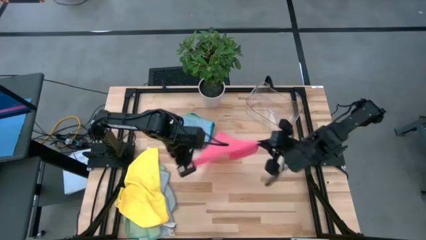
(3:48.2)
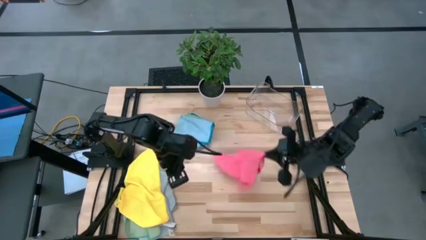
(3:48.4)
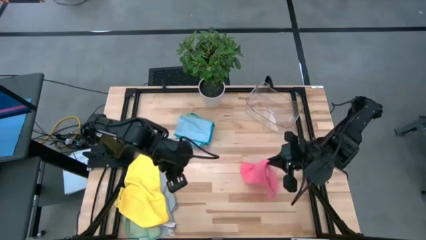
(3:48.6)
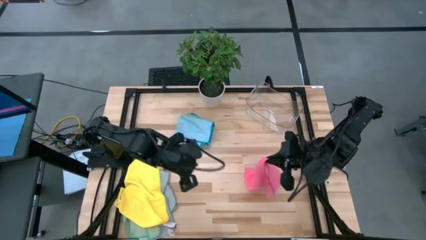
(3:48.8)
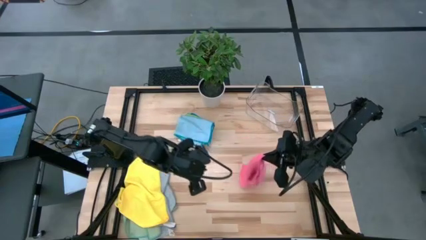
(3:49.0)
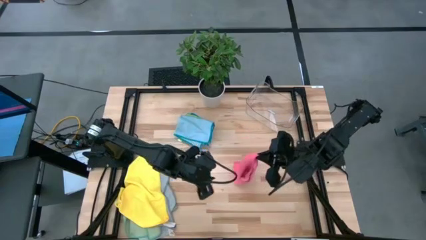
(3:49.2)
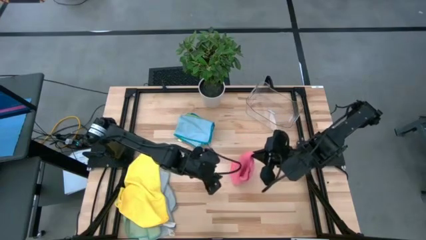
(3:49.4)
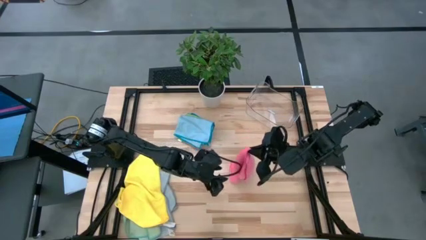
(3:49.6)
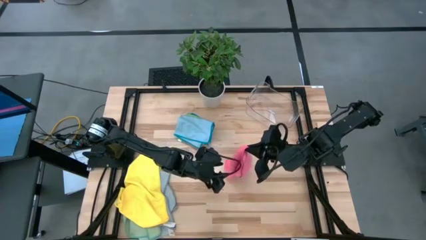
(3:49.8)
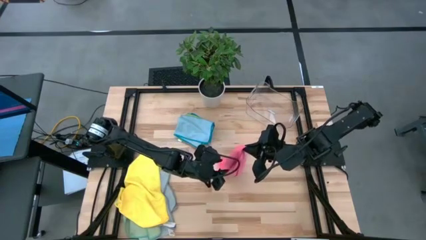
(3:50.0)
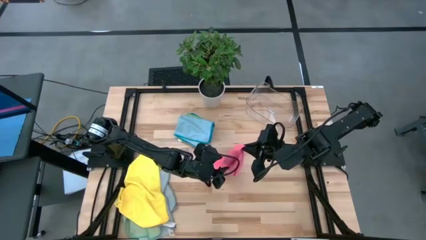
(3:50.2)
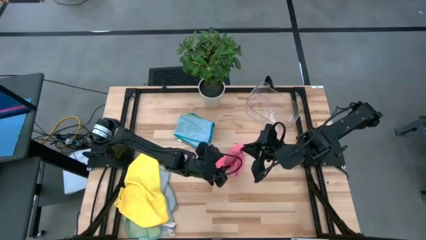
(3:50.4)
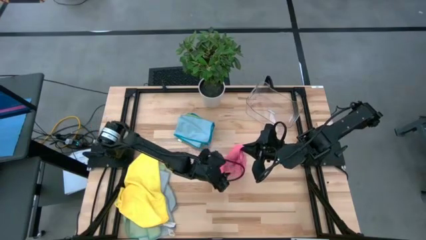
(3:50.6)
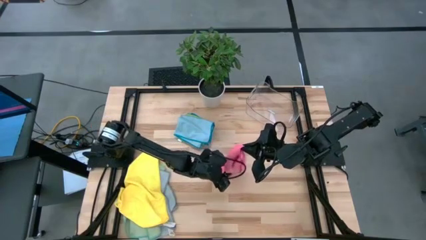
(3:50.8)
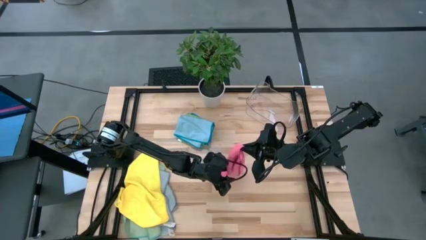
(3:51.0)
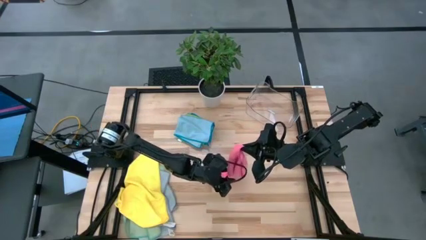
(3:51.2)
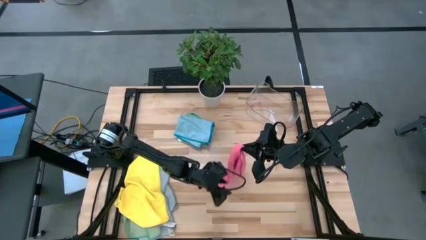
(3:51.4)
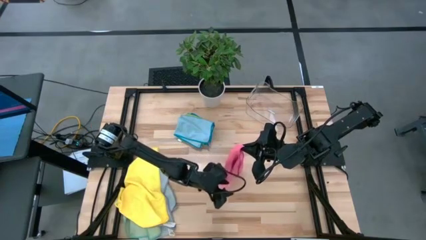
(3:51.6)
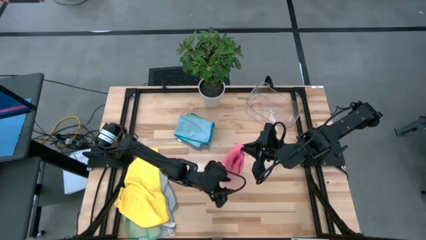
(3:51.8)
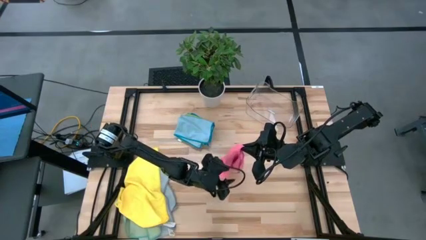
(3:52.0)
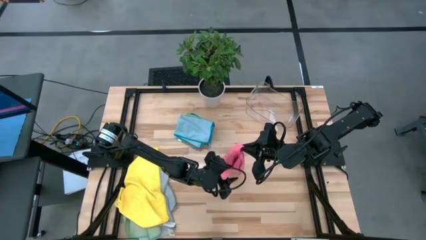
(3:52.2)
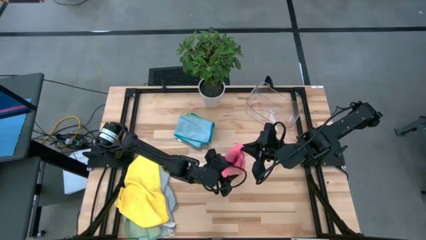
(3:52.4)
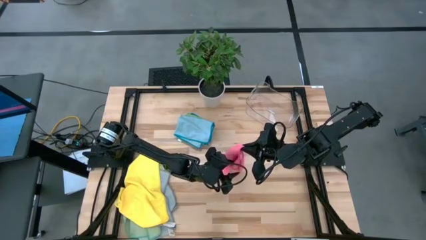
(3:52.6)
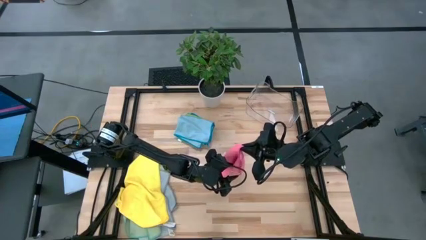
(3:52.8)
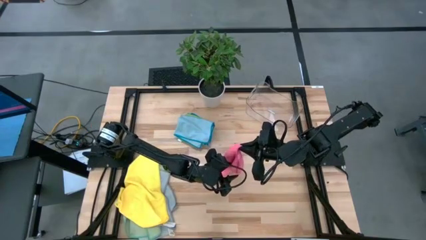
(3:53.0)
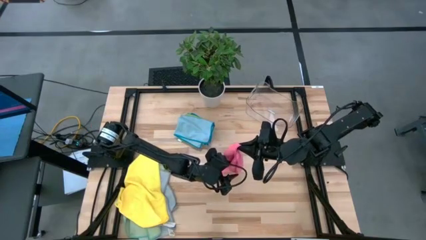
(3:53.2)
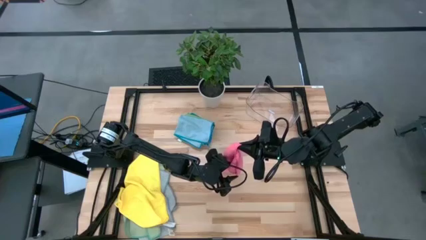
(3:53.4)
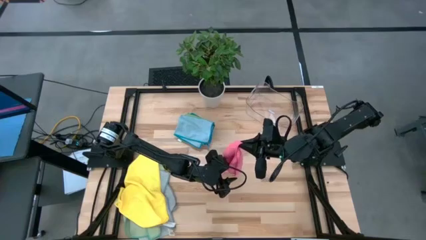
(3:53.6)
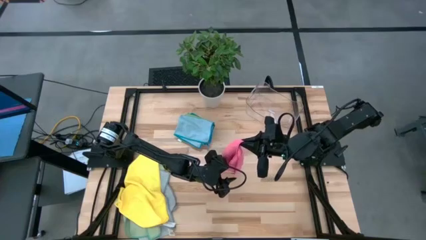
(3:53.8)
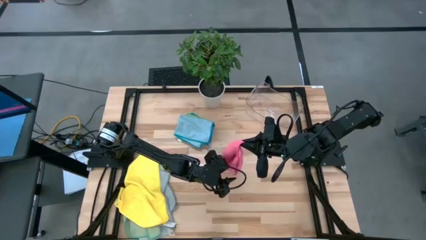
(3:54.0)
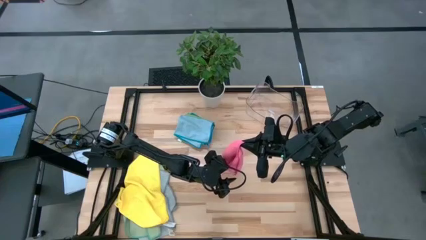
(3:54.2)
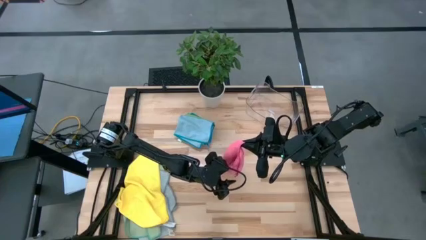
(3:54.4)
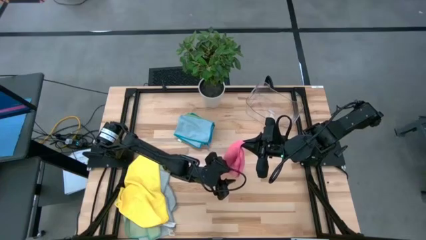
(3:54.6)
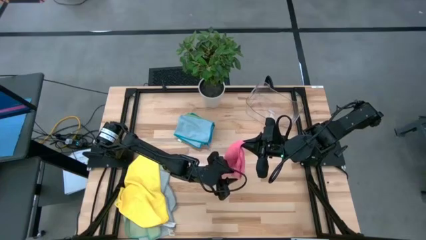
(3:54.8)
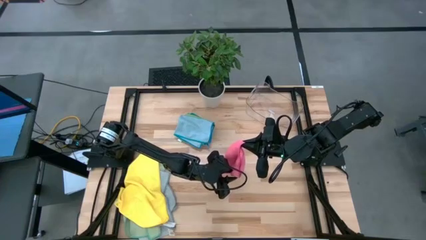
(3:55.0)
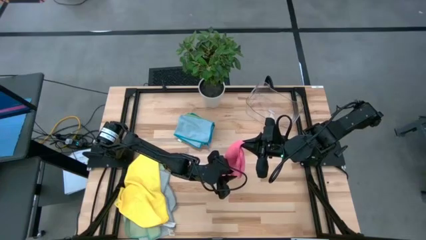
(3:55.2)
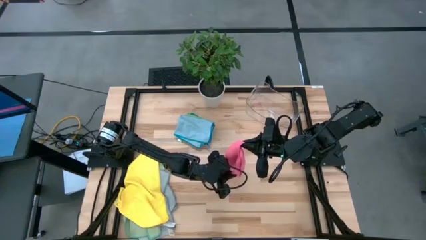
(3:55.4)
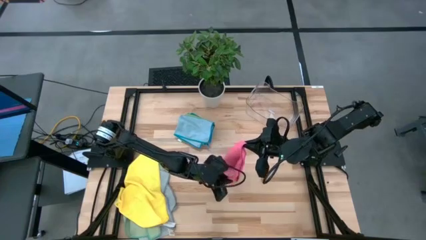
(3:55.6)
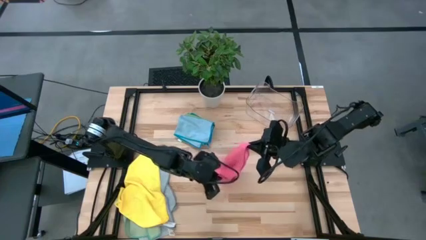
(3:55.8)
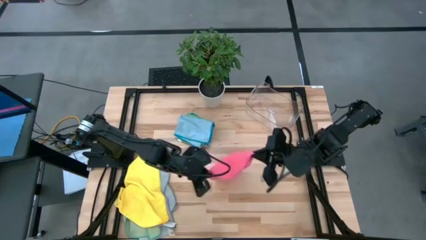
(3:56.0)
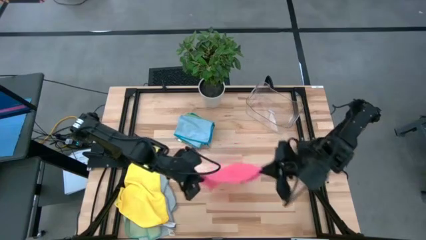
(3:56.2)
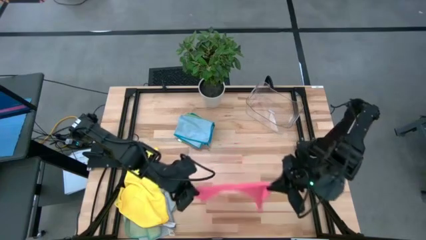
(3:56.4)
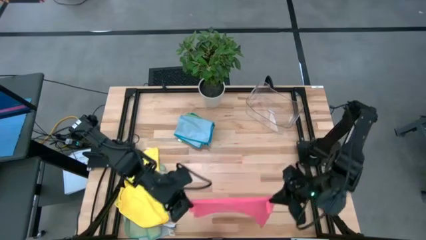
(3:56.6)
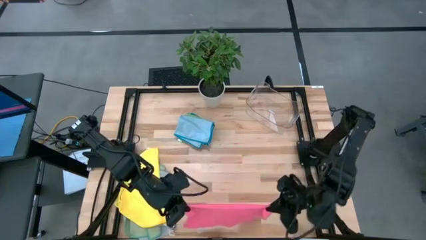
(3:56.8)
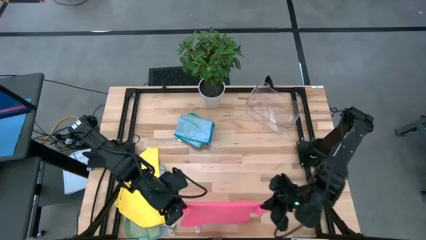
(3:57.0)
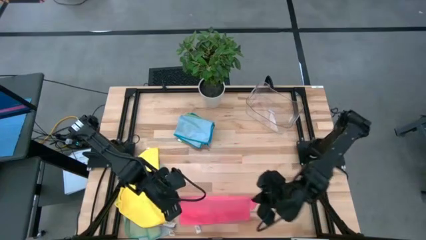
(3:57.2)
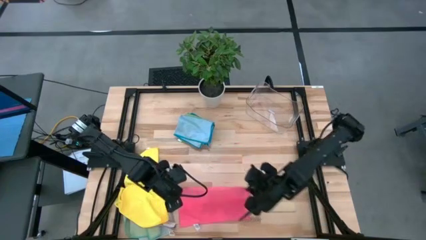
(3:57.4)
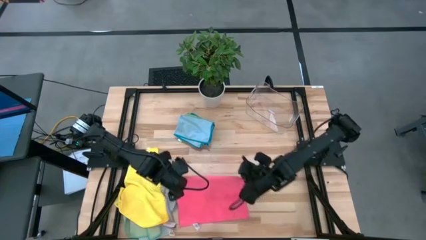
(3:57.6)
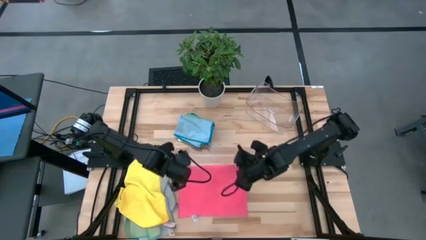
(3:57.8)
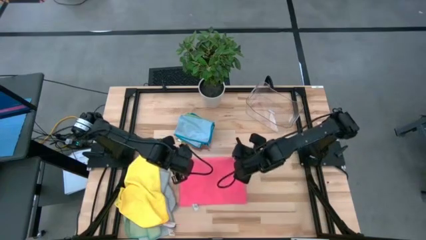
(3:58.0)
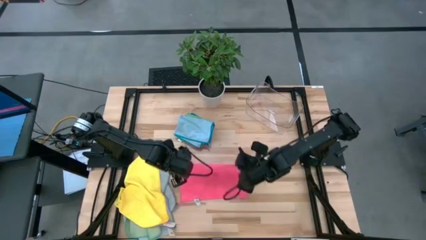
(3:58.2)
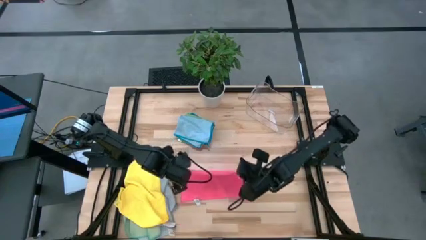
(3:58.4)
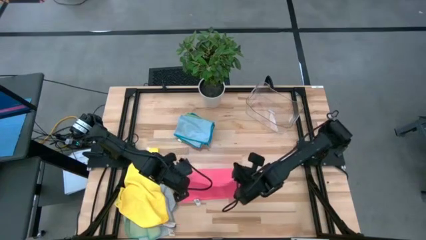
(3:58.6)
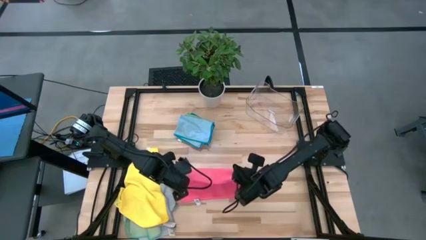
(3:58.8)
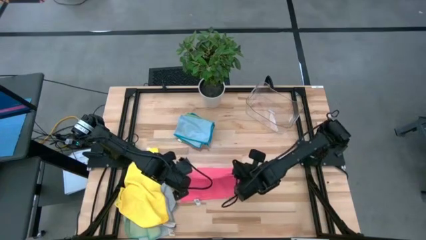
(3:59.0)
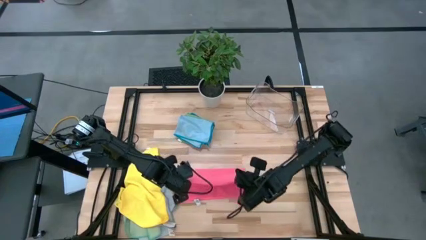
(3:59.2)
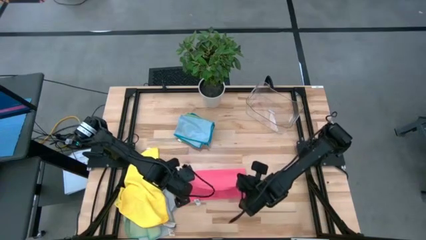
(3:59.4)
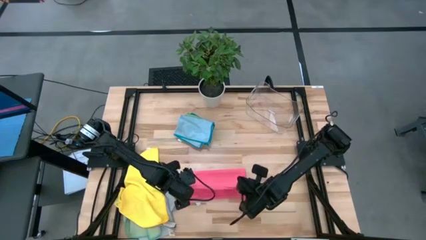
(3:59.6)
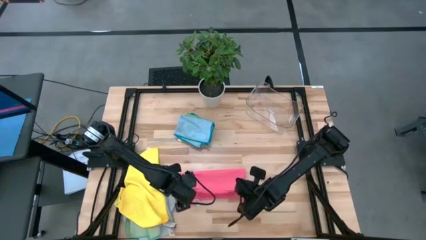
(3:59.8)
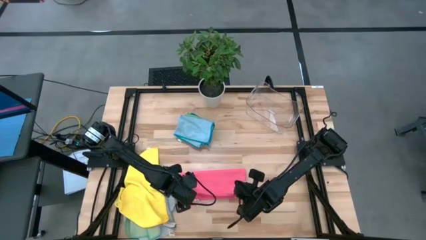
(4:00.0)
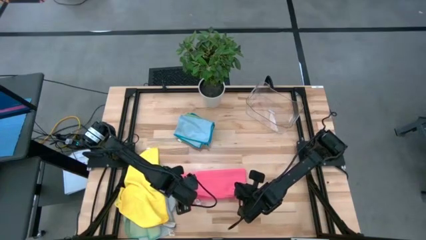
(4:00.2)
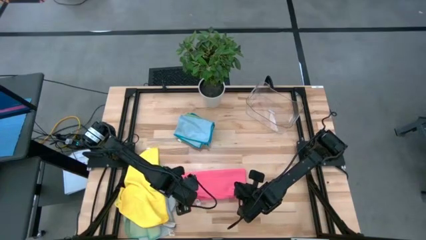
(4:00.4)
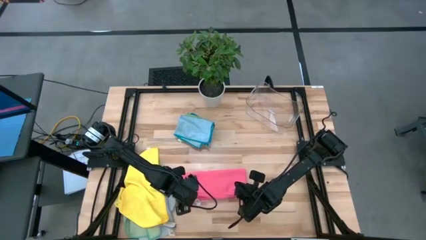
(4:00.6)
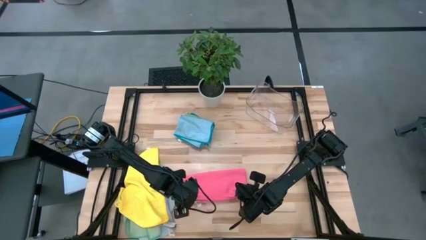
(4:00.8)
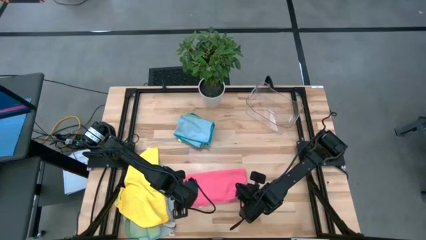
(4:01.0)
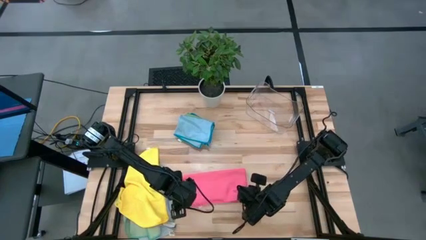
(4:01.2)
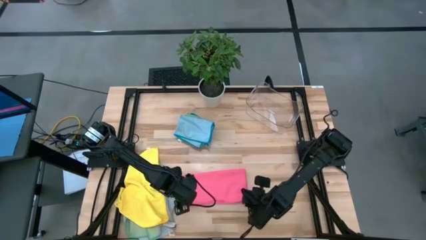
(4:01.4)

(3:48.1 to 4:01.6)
Task: Fold microfiber towels
Fold the pink microfiber towel

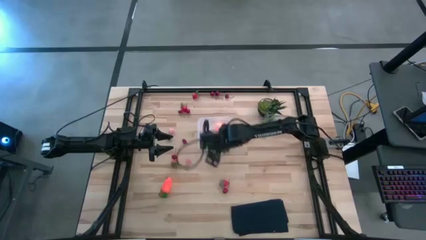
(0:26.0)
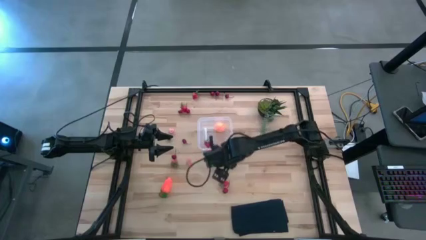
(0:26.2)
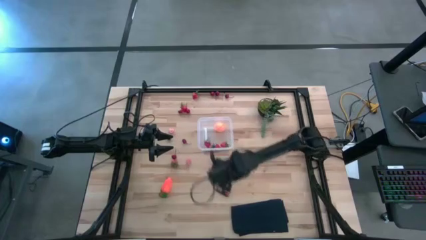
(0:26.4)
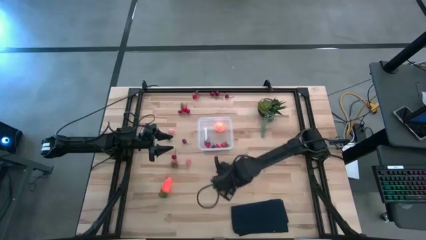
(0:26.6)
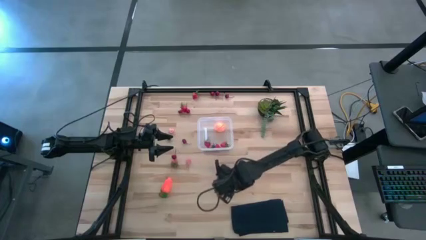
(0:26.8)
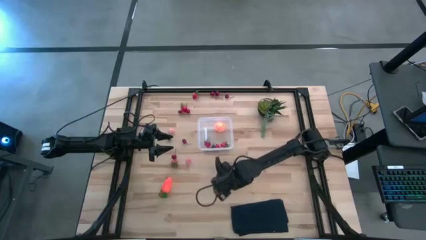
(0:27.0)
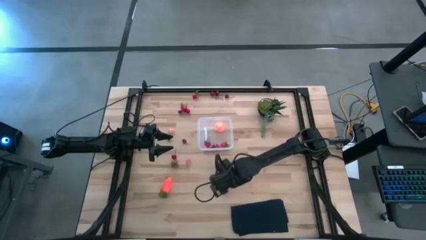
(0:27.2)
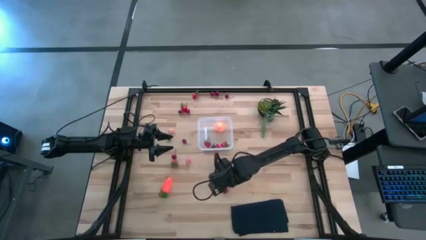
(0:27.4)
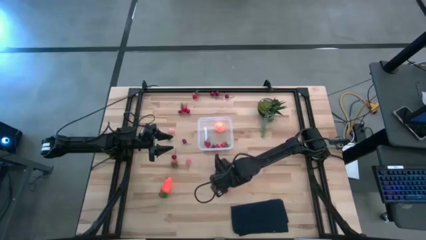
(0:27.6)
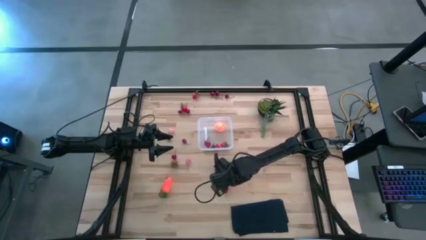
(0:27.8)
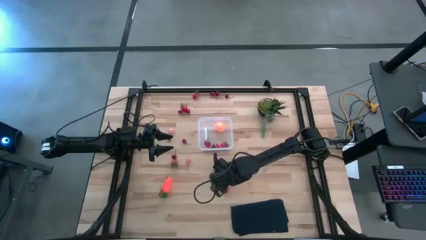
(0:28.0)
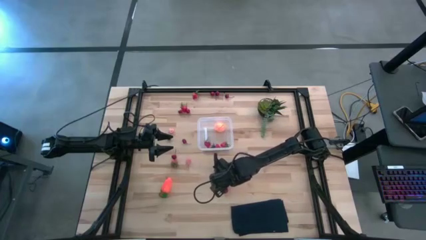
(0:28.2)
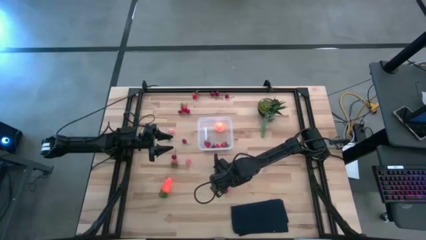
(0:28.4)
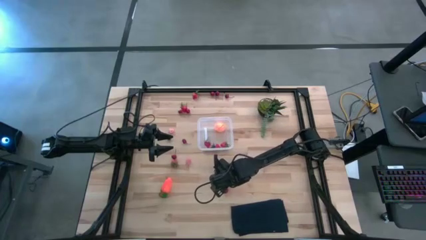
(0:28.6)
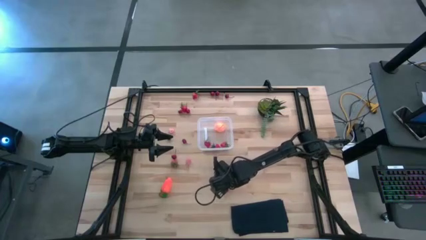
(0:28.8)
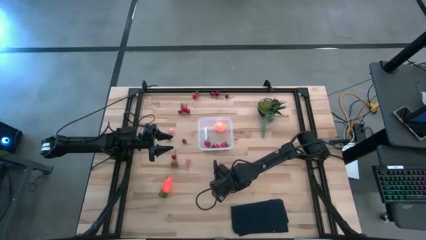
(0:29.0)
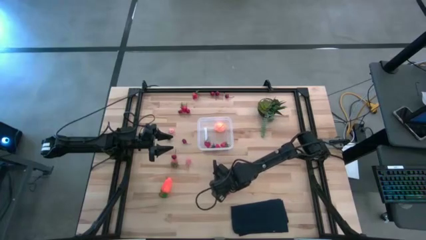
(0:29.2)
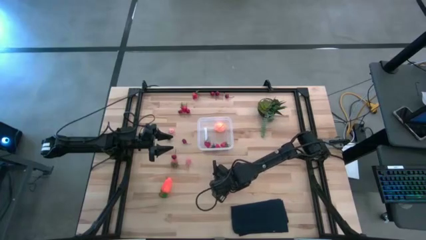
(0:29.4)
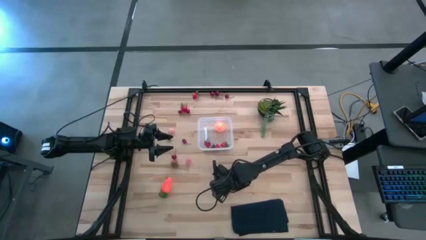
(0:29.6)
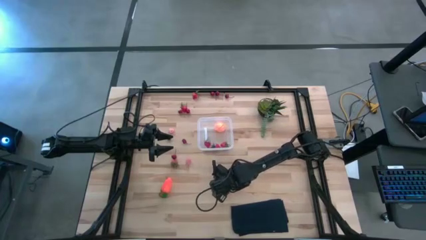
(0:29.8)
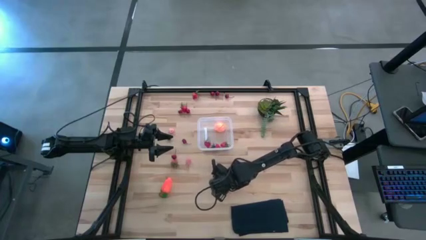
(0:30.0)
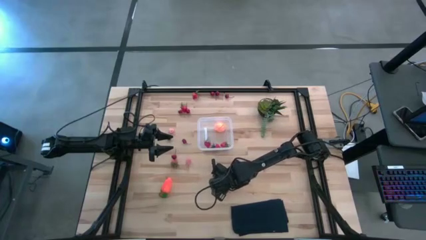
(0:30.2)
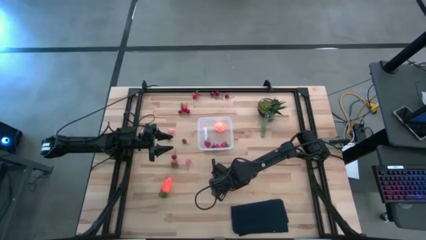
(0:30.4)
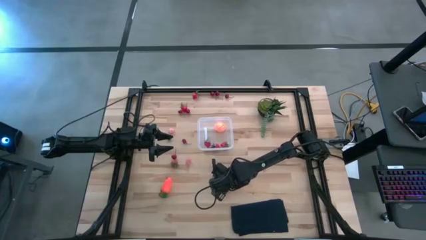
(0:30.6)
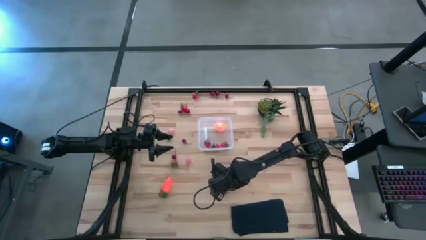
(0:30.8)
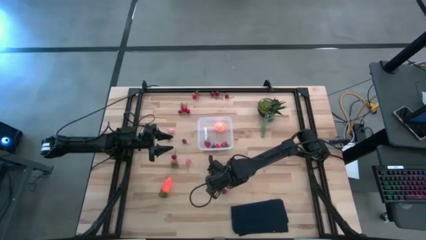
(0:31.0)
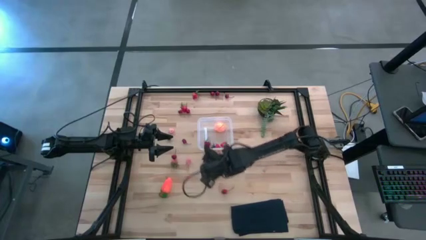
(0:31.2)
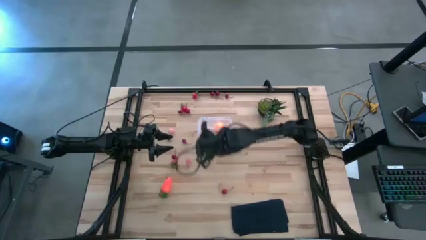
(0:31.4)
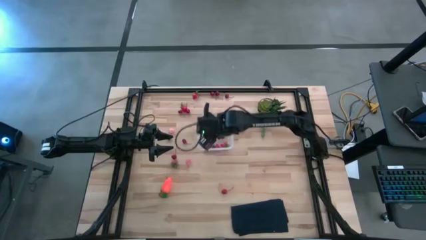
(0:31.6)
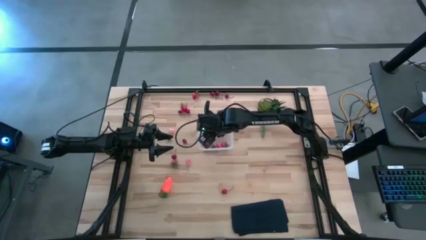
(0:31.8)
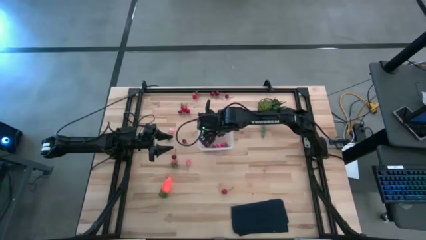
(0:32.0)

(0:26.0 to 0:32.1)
Task: Pick and placing Produce into tupperware
Put the strawberry into the transparent bin
